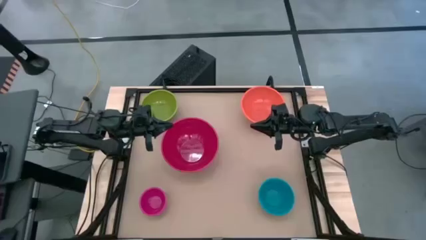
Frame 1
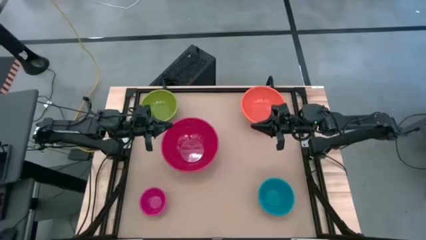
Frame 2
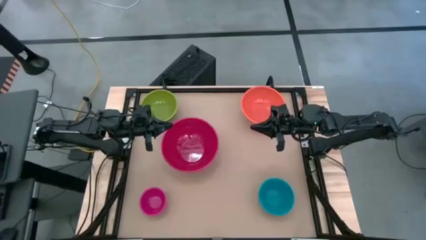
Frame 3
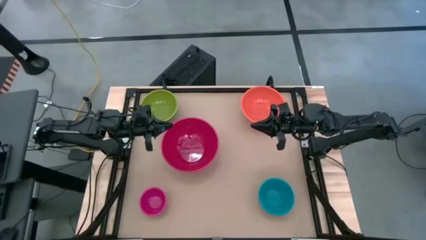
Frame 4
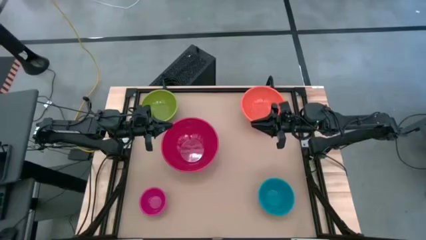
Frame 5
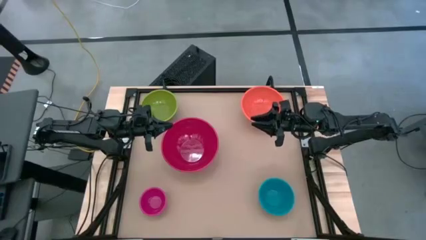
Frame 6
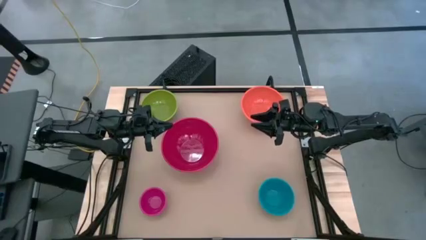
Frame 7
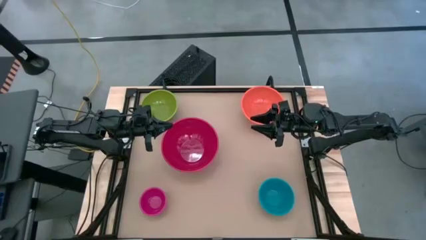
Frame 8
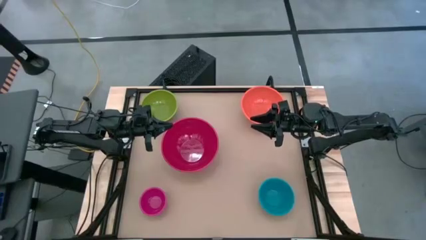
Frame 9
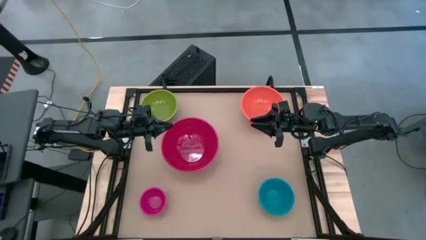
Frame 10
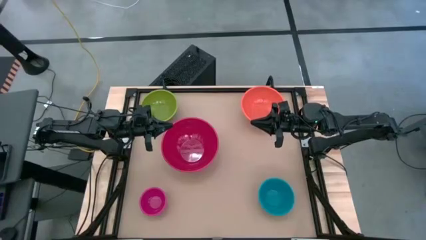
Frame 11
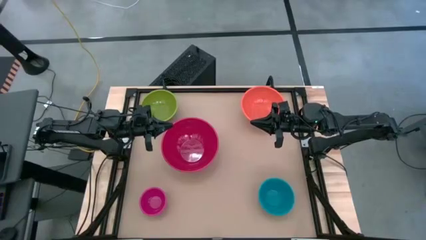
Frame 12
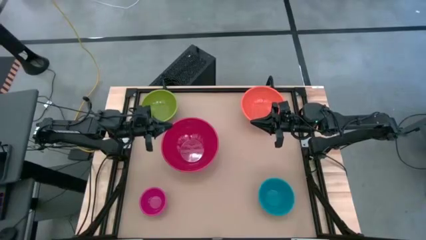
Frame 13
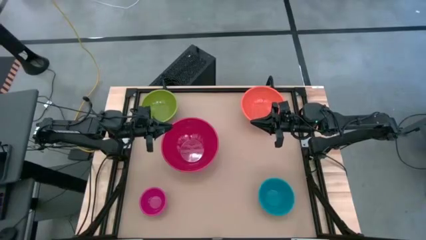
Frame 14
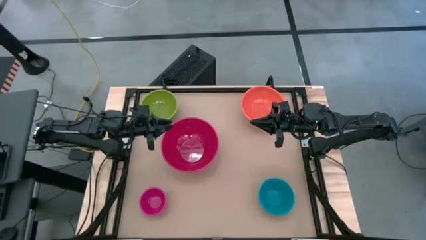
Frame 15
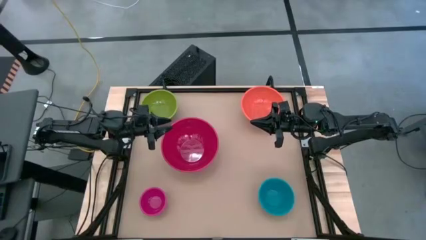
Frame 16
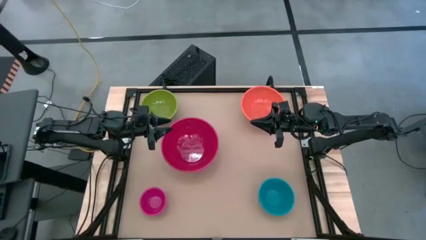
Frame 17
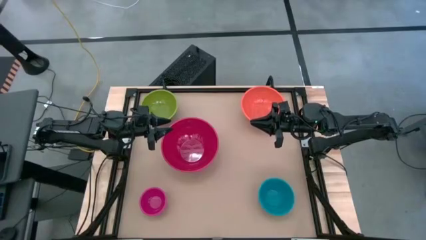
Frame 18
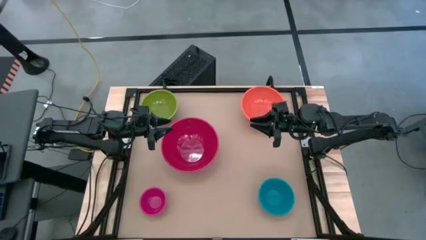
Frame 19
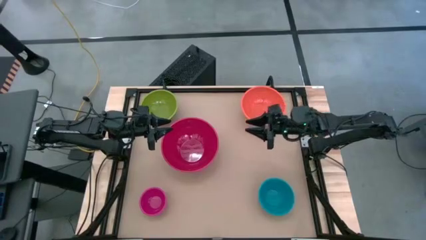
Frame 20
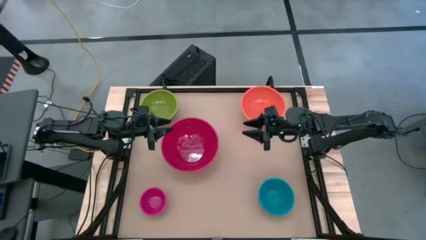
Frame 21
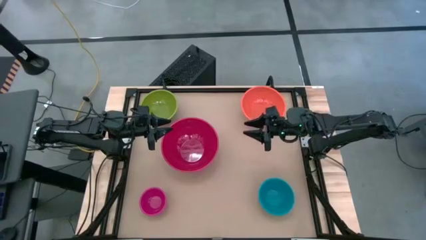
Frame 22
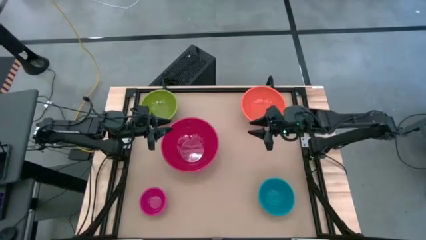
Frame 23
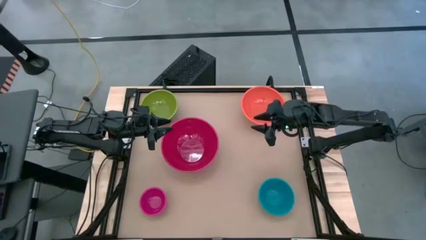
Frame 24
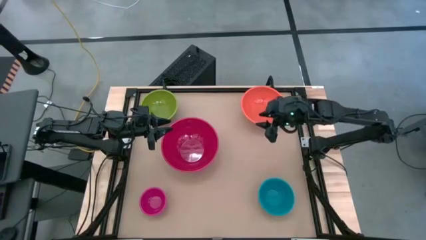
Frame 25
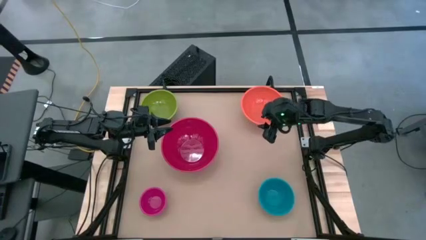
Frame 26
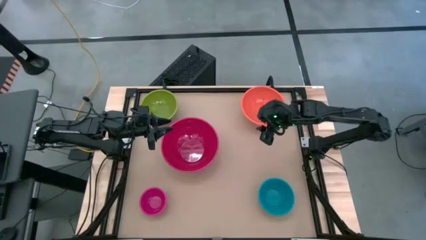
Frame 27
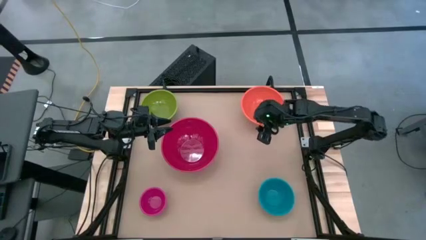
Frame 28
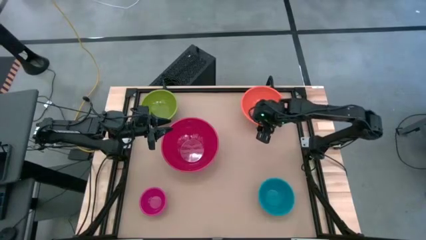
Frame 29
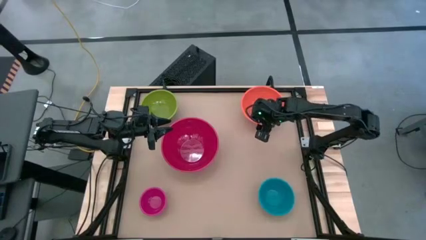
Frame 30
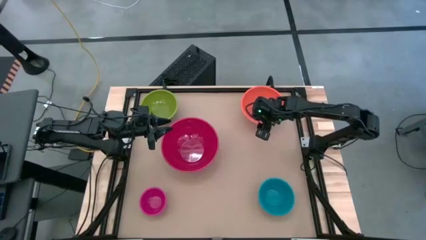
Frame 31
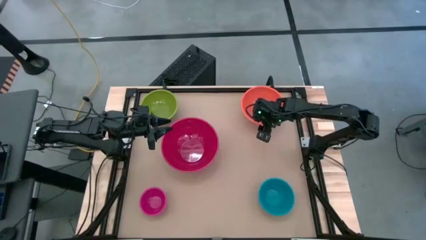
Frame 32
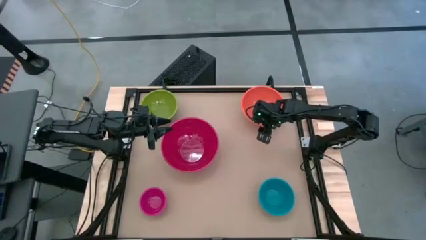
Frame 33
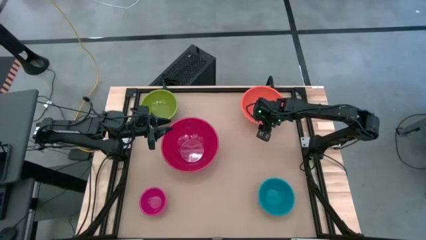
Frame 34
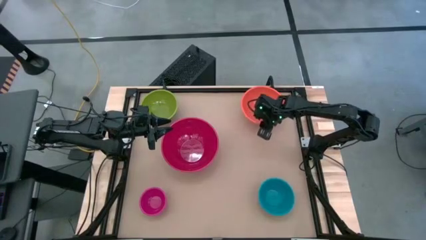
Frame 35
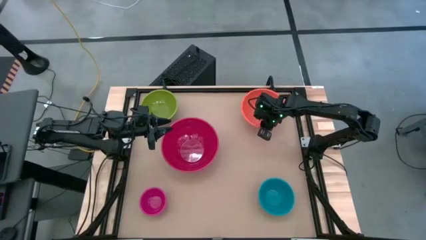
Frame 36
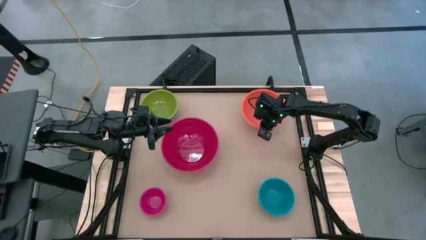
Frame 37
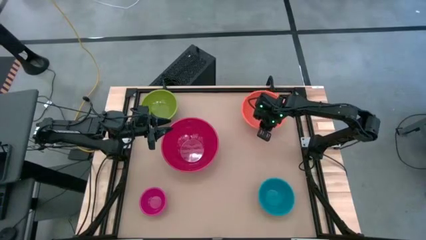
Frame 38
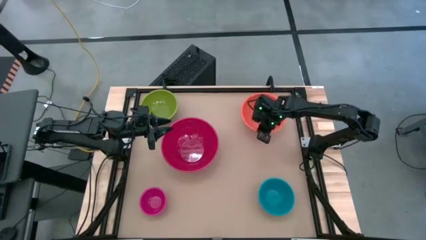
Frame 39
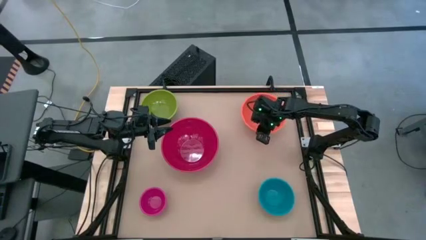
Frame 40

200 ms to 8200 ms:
Stack the orange bowl on top of the red bowl

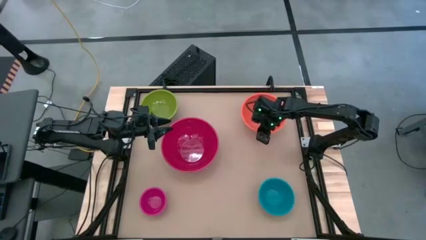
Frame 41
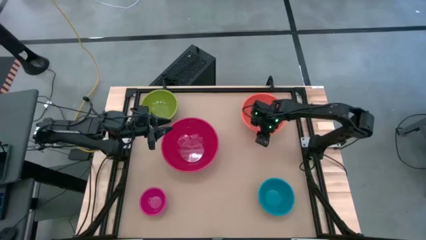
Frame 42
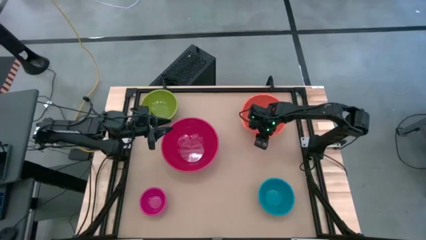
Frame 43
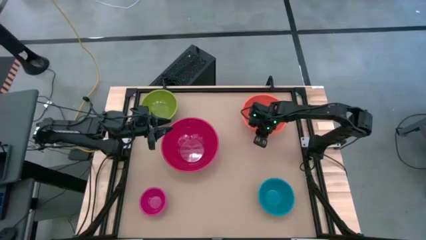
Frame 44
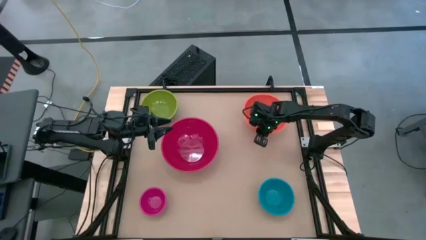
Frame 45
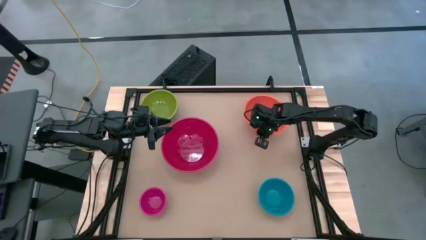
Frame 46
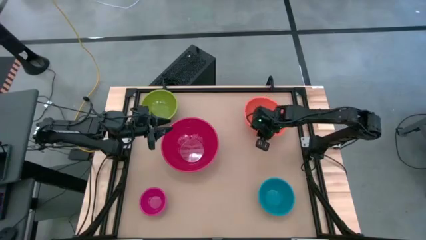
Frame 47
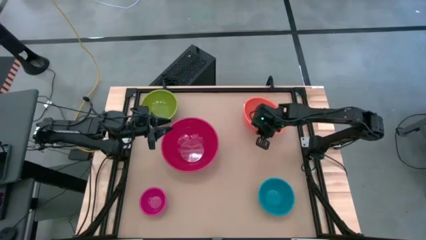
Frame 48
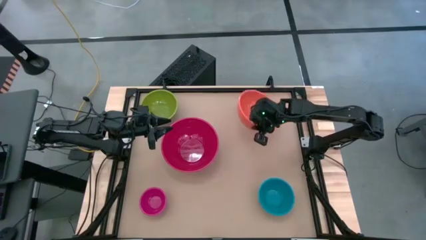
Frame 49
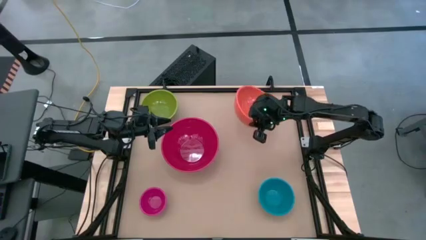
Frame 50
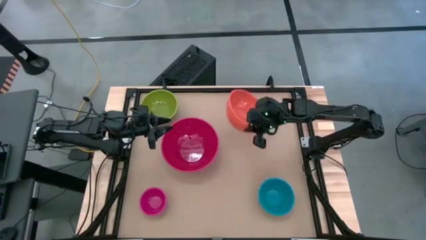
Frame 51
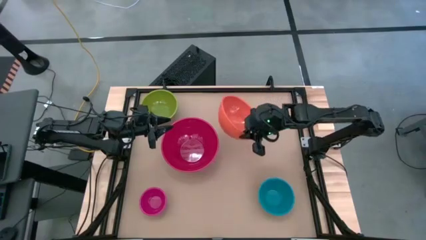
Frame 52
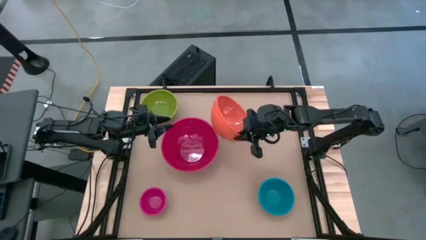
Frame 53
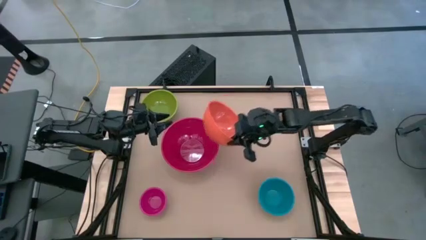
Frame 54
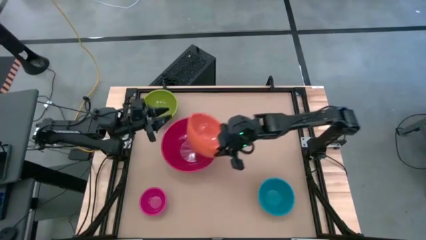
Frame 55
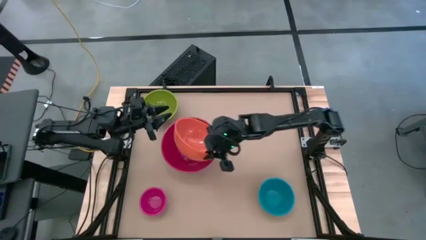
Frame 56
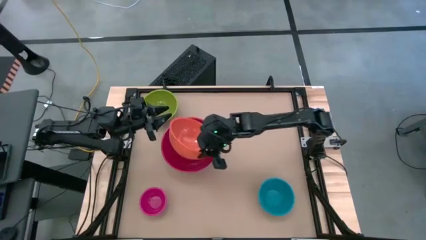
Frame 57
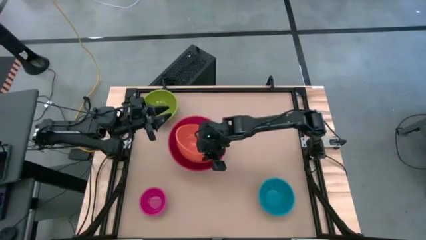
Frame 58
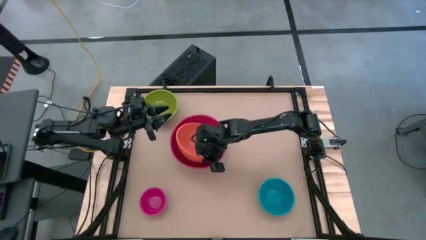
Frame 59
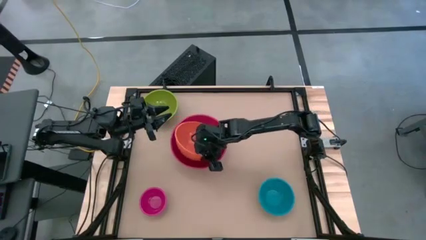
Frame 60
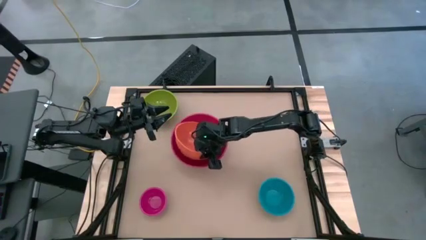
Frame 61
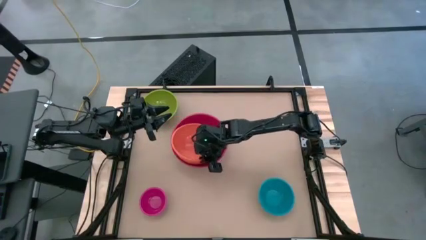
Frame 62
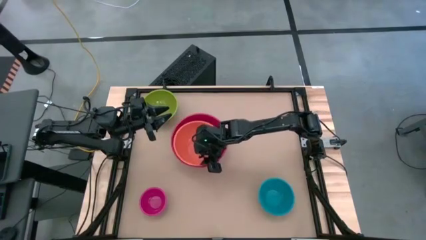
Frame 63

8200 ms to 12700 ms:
Stack the orange bowl on top of the red bowl

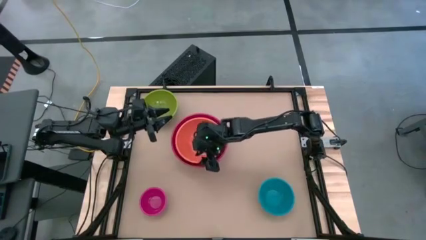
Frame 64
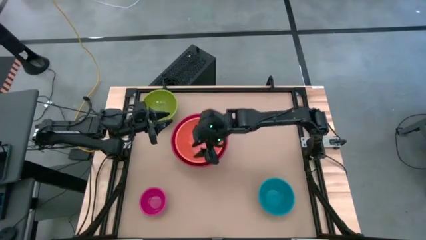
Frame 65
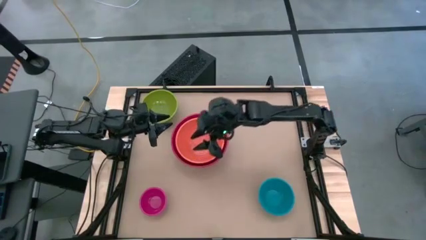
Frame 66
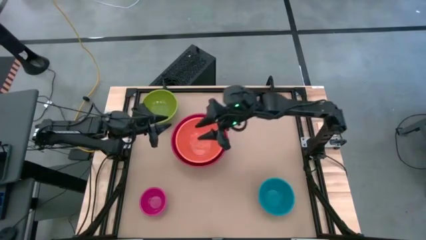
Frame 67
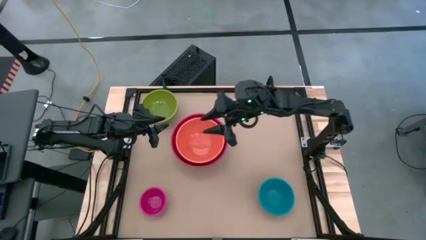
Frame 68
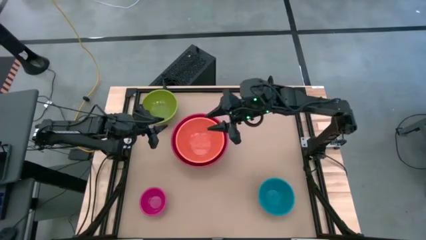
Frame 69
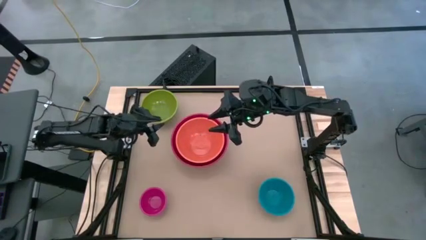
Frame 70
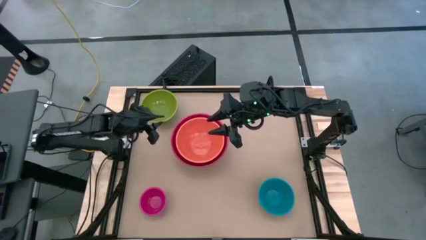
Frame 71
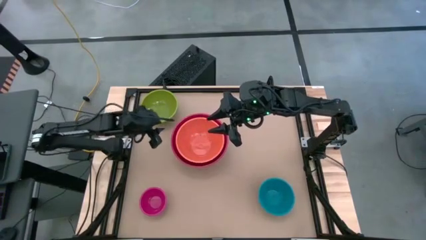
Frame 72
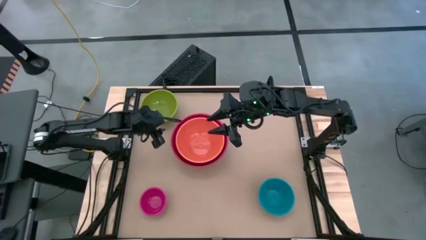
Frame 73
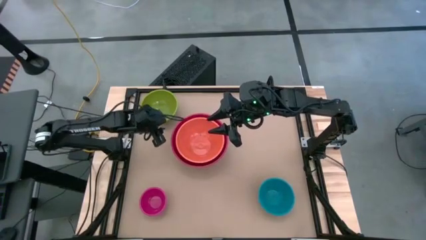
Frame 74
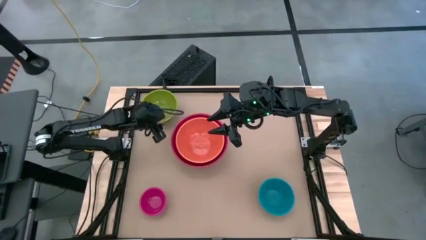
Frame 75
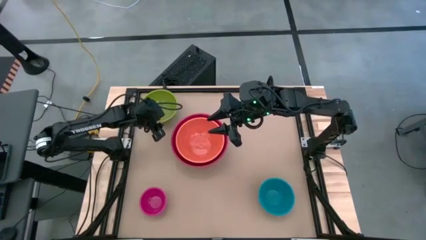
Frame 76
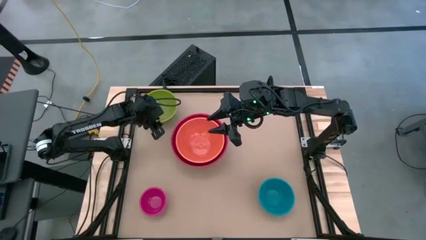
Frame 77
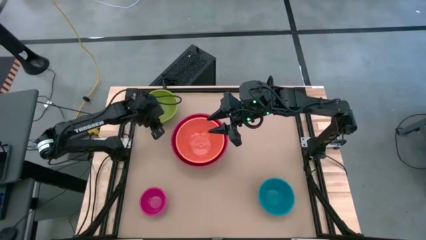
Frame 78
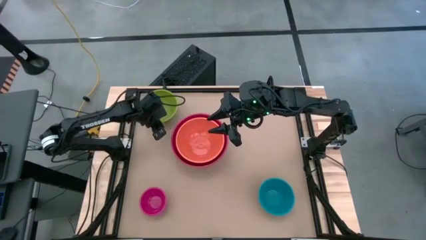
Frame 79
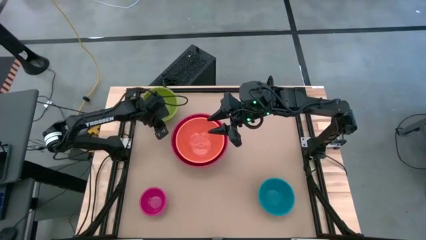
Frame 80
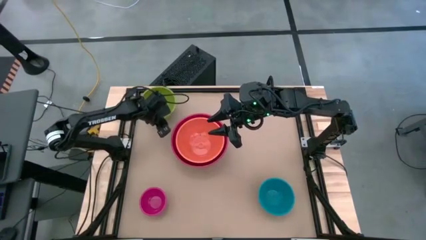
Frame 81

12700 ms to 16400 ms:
Stack the green bowl on top of the orange bowl
